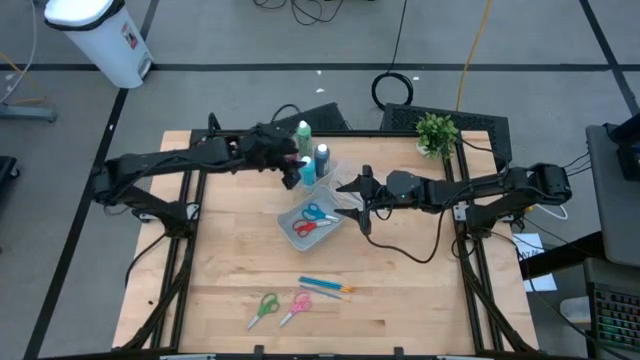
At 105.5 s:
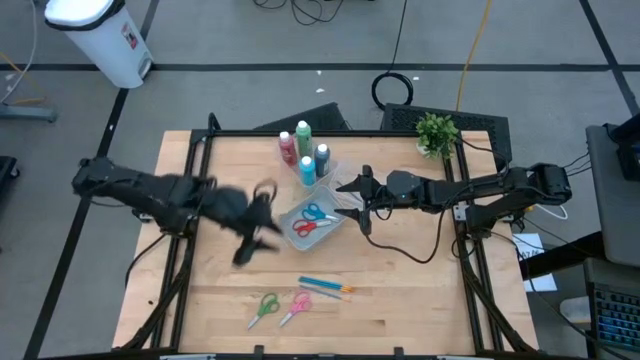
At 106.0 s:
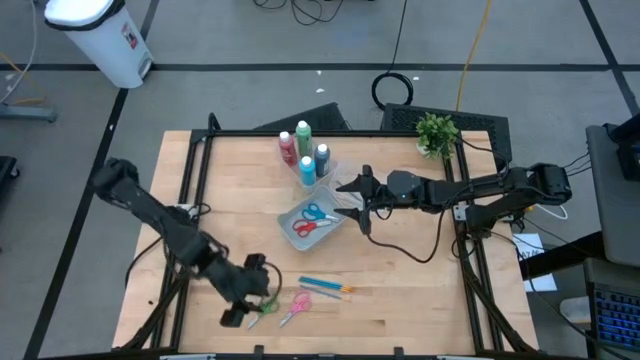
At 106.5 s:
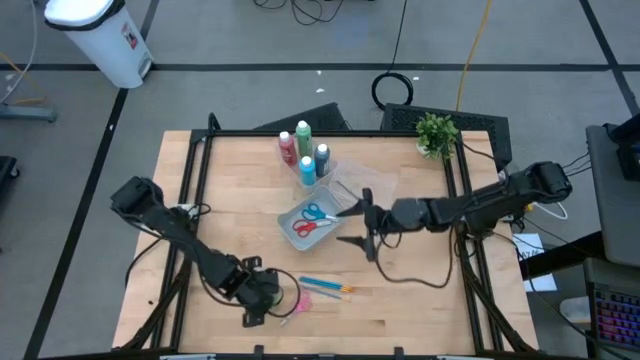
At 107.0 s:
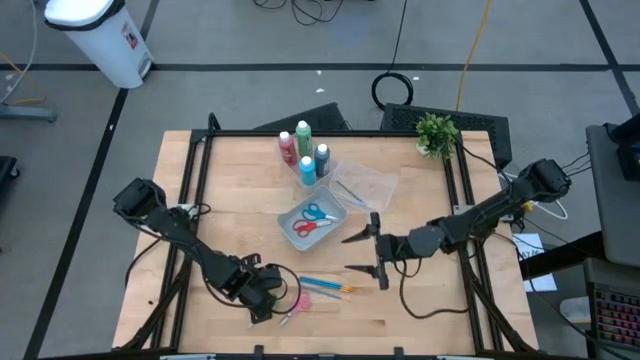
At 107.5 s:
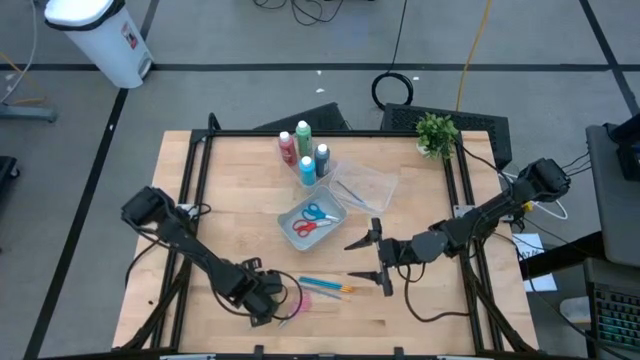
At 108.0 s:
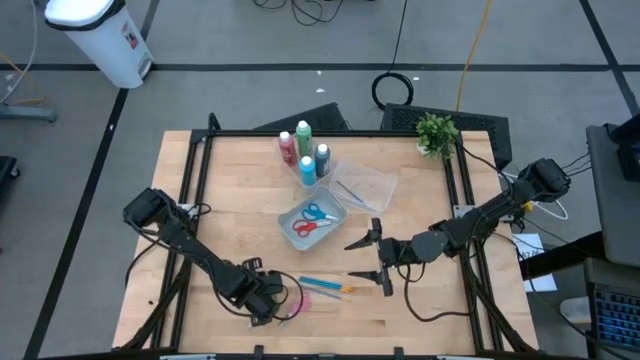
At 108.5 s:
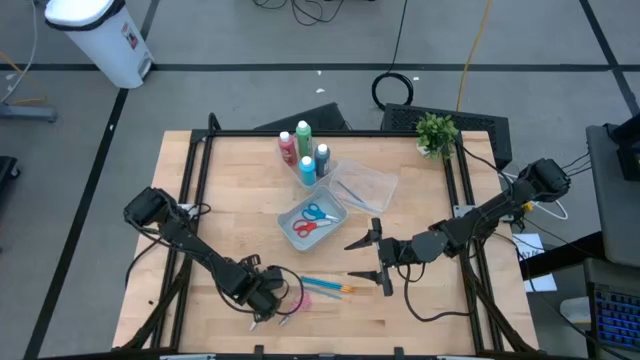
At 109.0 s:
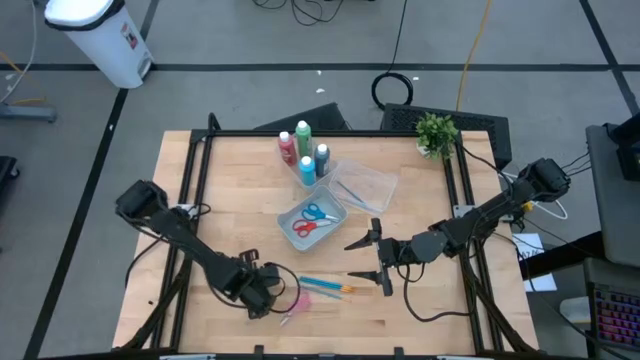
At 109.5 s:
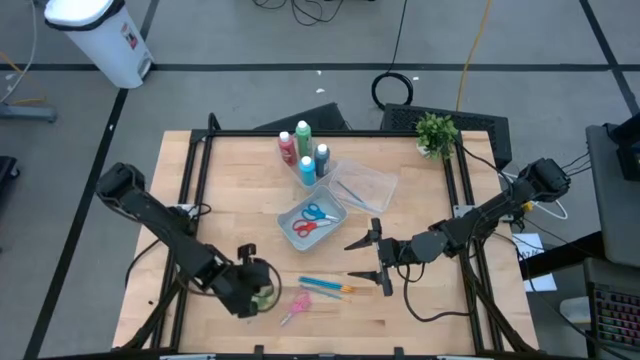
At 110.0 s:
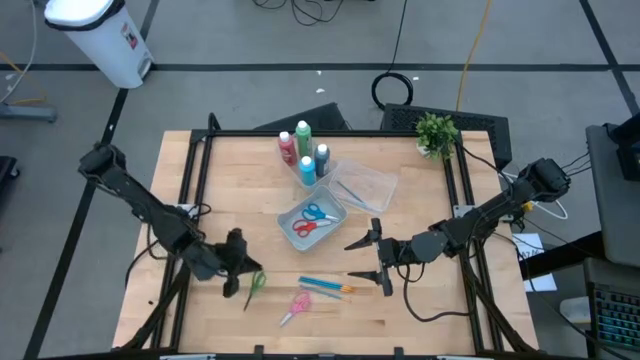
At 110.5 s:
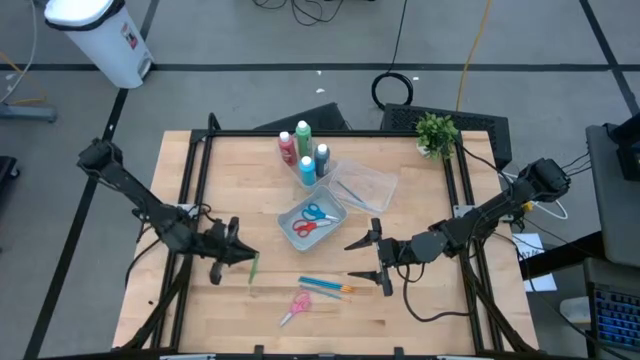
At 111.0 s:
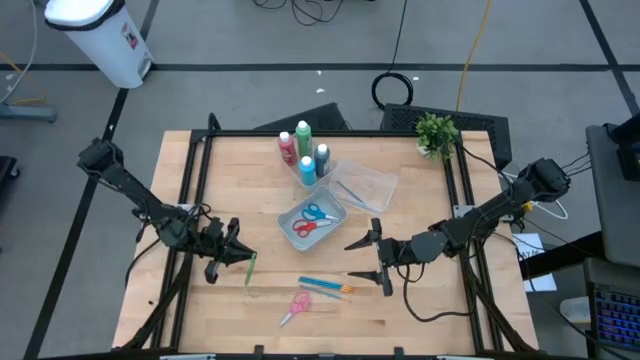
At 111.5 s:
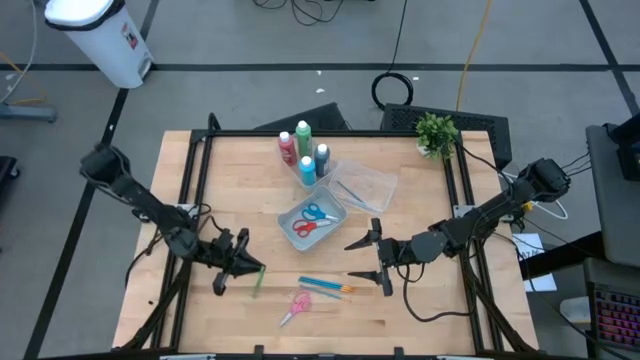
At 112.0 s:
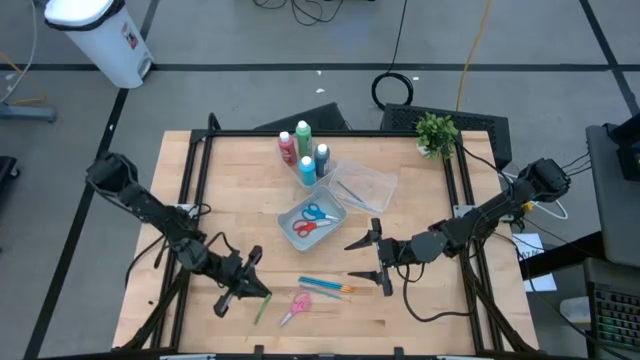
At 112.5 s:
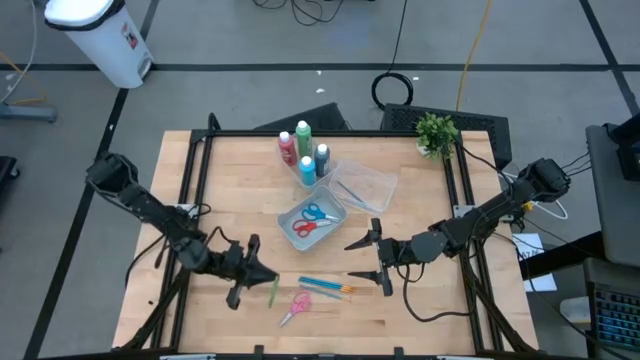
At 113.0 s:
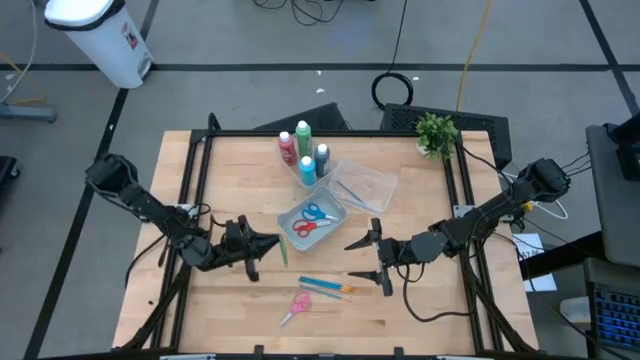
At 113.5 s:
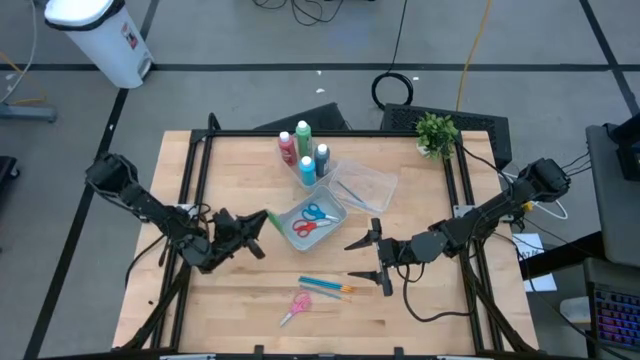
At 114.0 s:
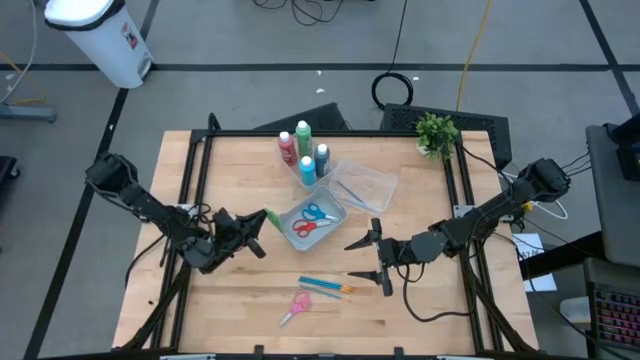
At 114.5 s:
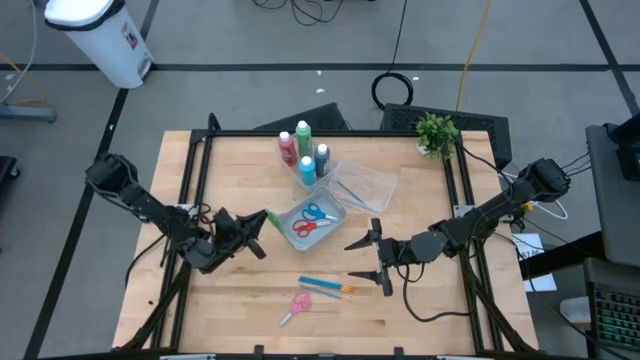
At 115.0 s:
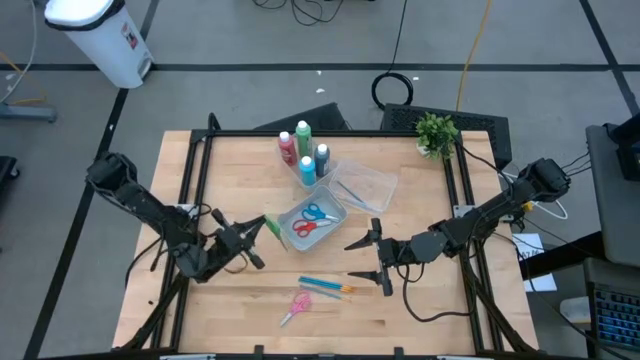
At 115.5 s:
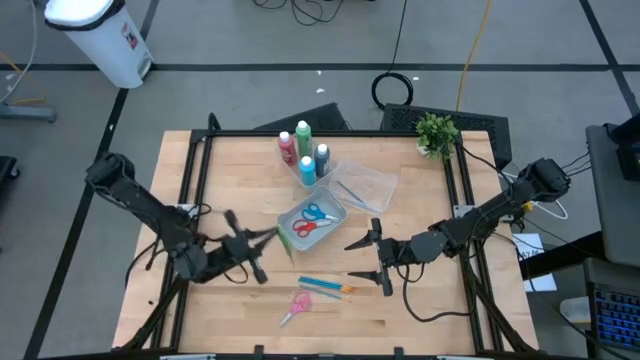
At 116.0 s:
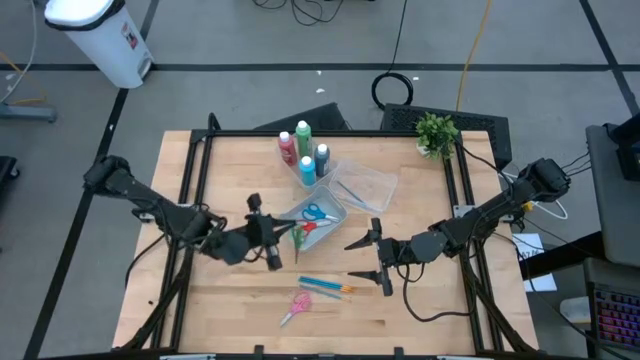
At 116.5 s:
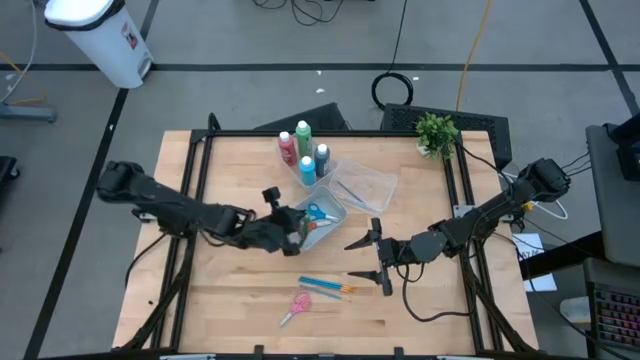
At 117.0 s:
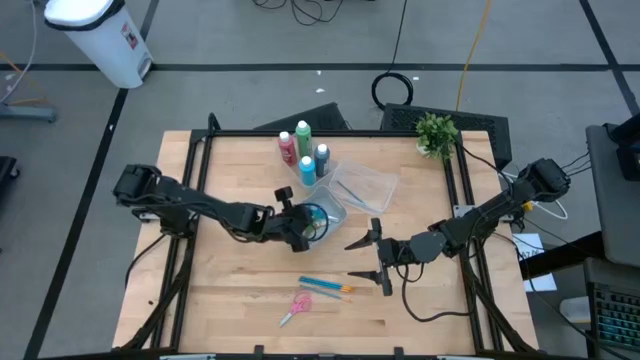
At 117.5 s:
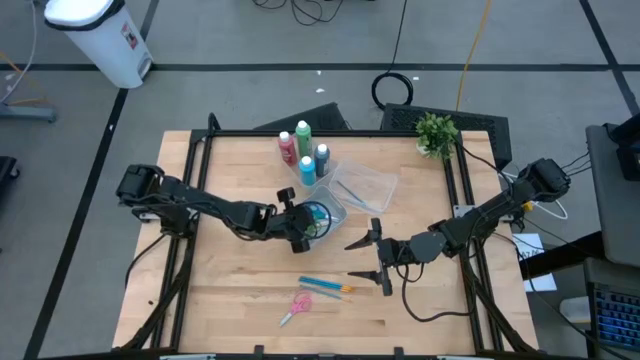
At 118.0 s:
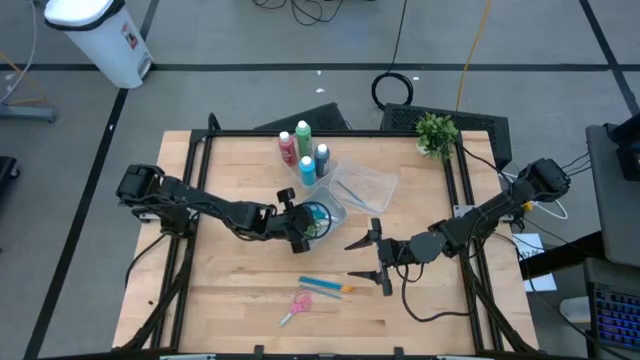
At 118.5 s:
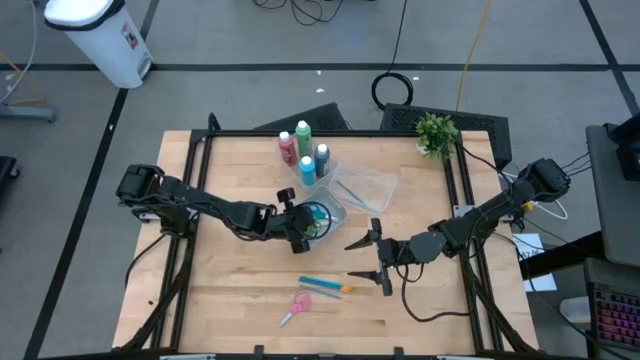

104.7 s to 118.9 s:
Task: Pick & Place Paint Supplies
Put the green scissors into the blue bin

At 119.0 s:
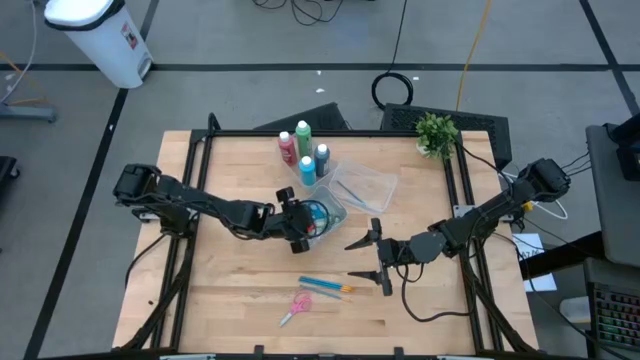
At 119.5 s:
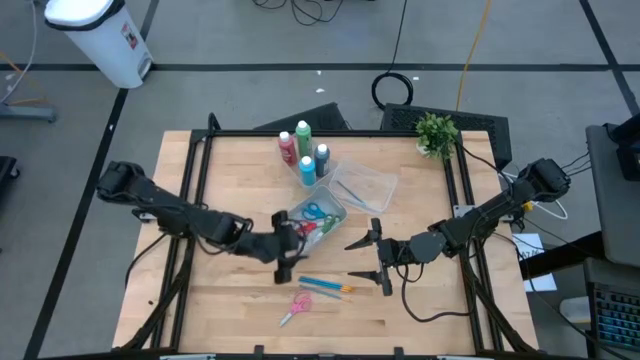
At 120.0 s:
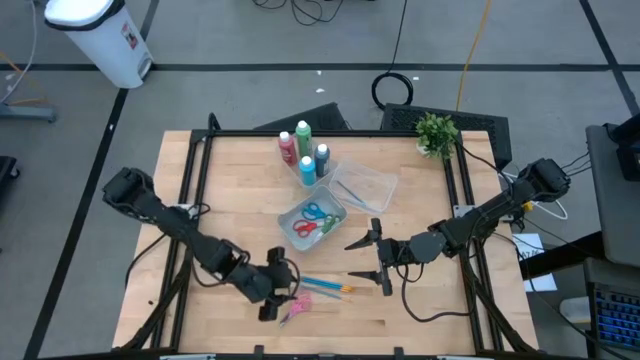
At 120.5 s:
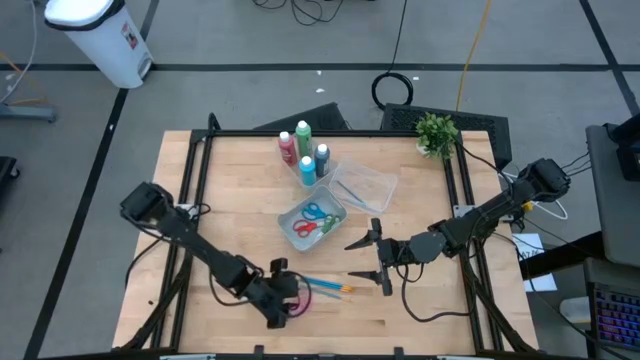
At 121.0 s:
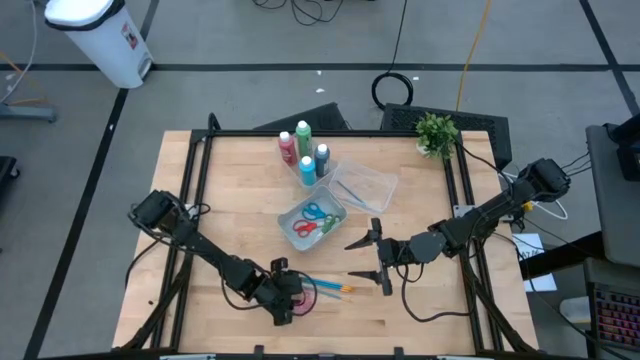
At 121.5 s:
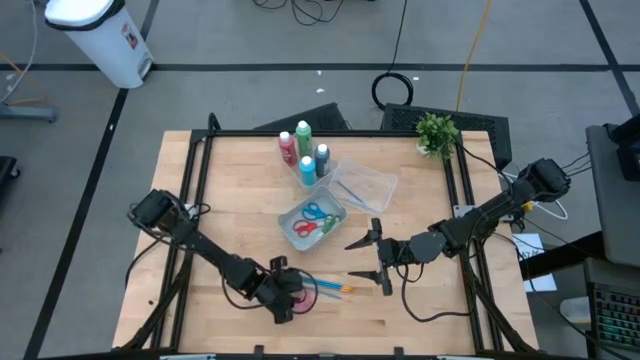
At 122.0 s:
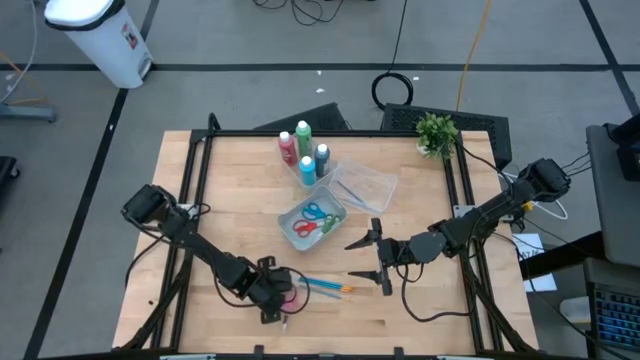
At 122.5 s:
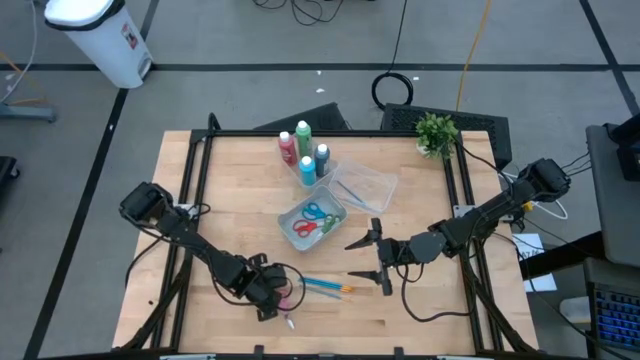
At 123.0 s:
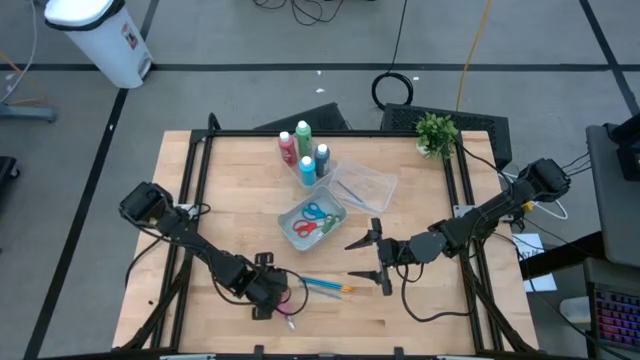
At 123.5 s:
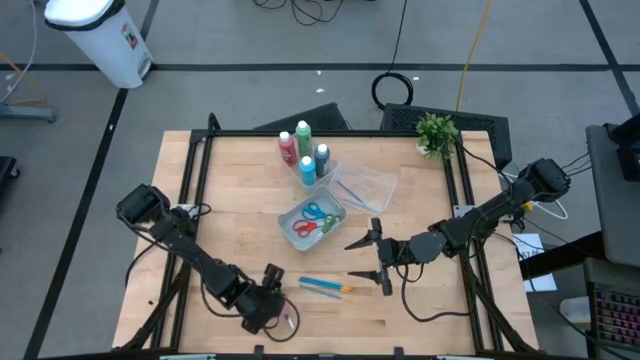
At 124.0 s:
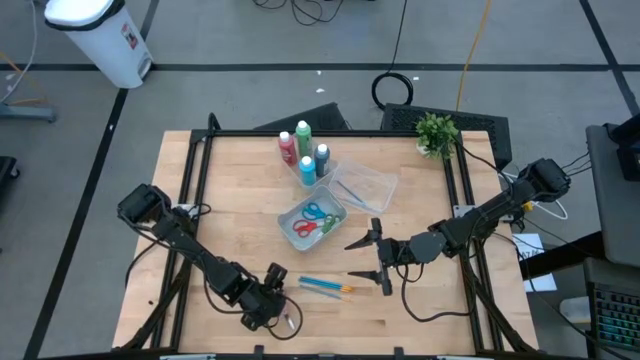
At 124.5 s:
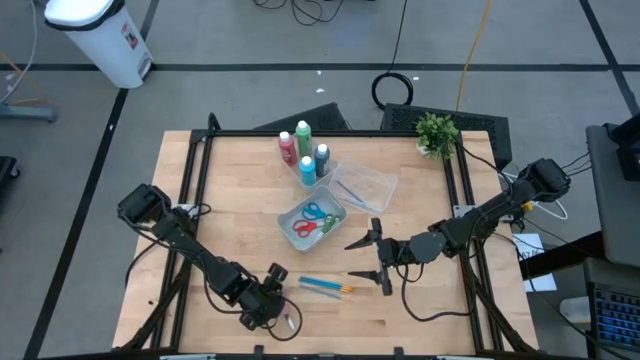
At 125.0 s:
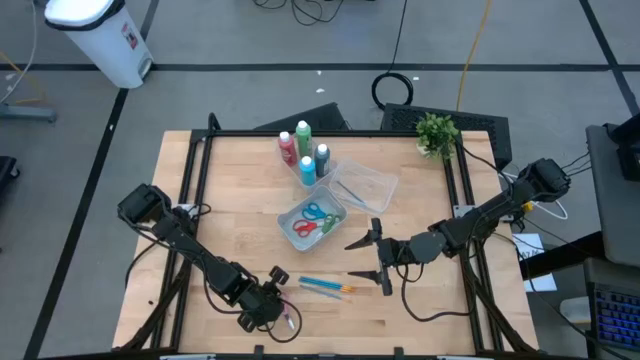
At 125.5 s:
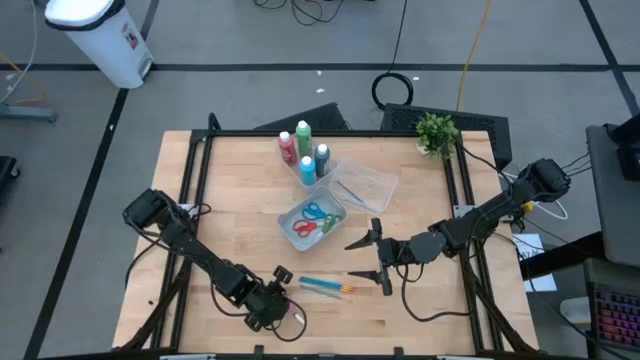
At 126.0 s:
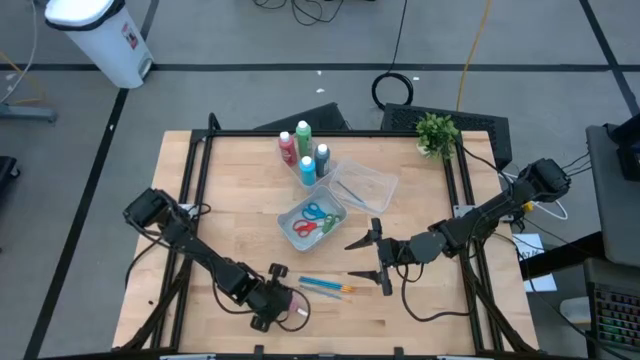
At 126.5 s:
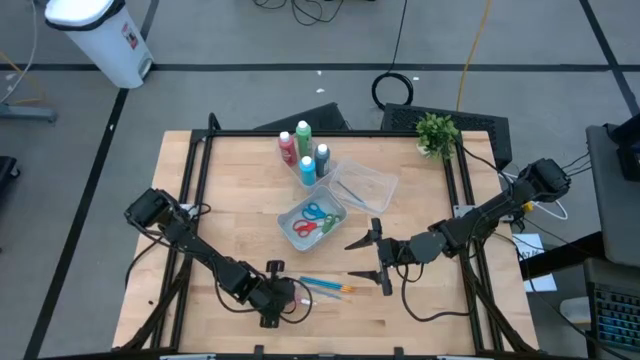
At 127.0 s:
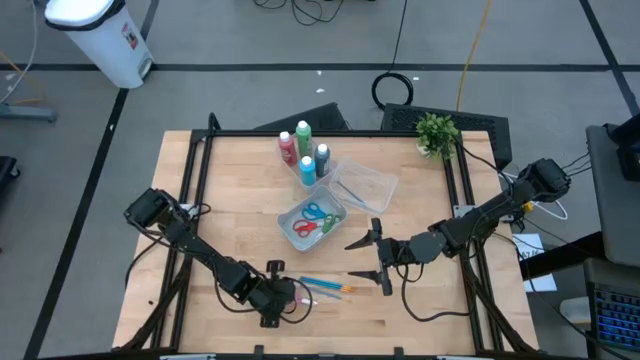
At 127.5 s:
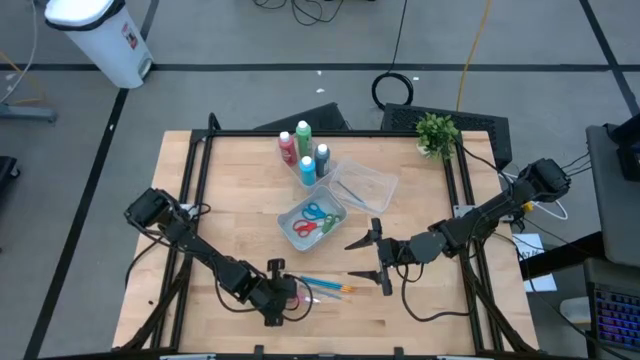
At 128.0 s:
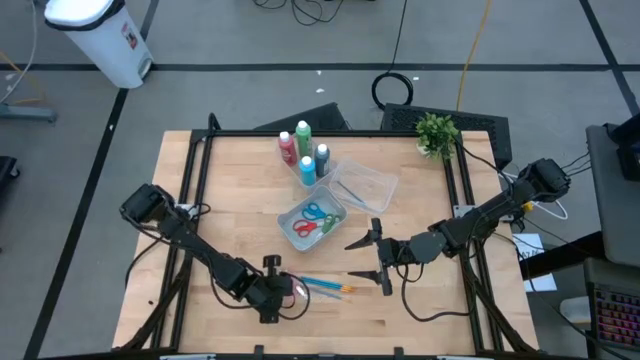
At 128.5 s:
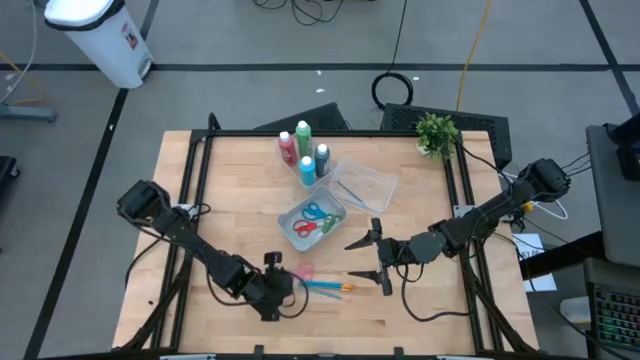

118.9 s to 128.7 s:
Put the pink scissors into the blue bin
